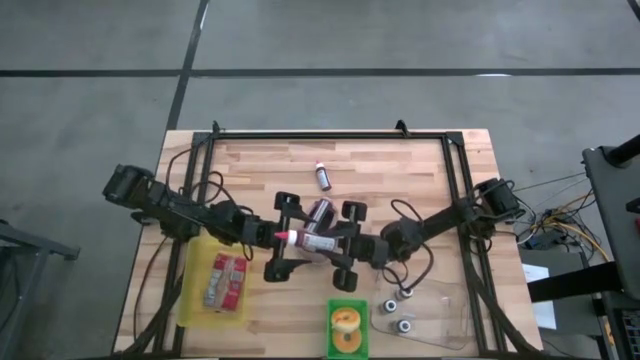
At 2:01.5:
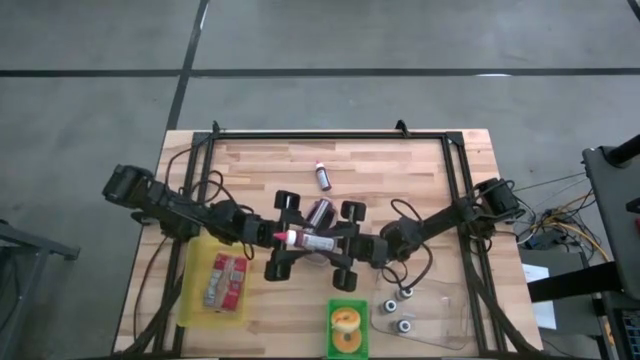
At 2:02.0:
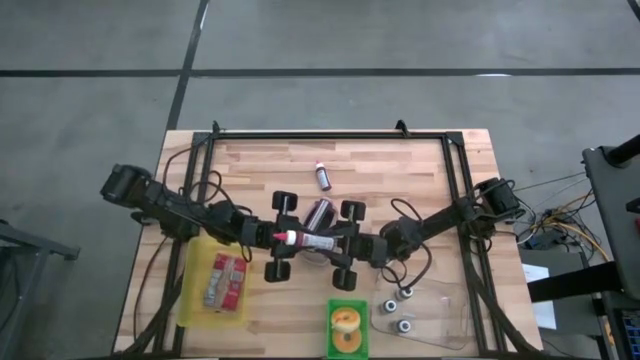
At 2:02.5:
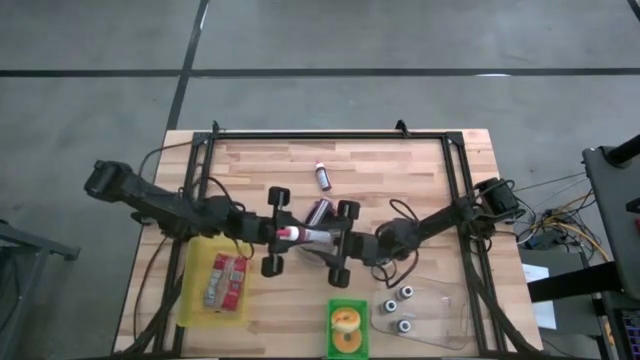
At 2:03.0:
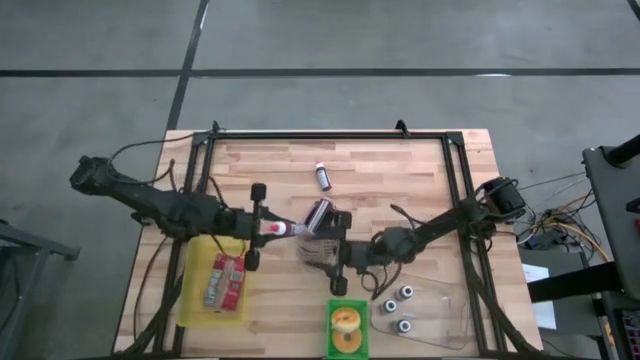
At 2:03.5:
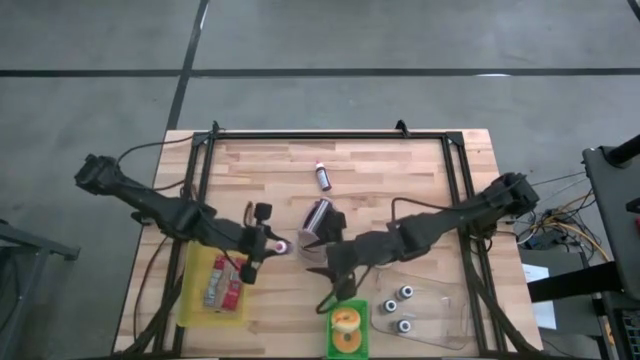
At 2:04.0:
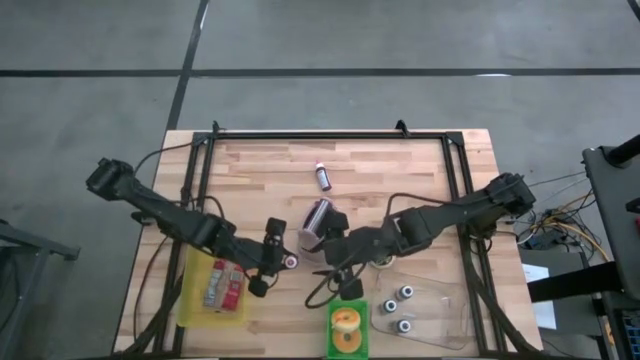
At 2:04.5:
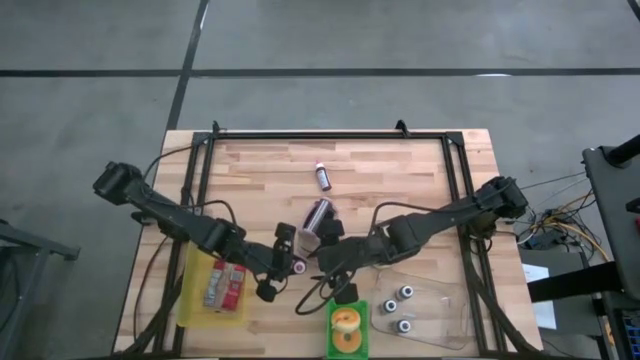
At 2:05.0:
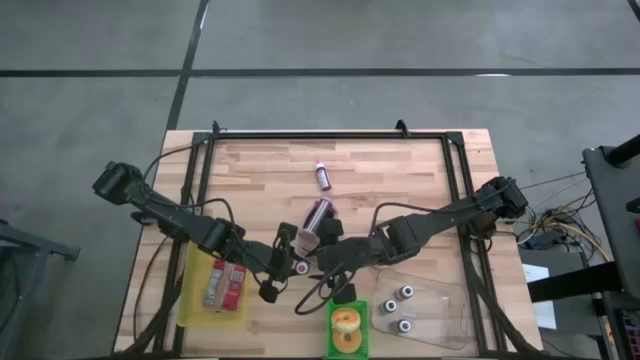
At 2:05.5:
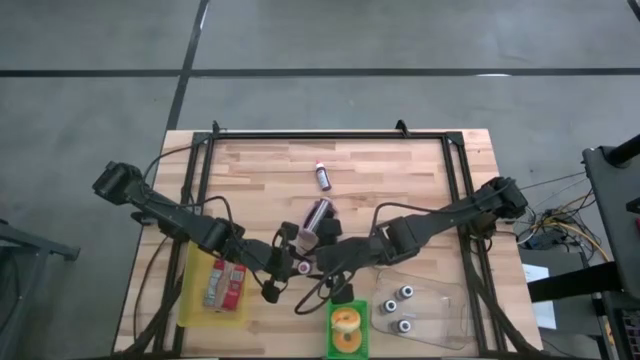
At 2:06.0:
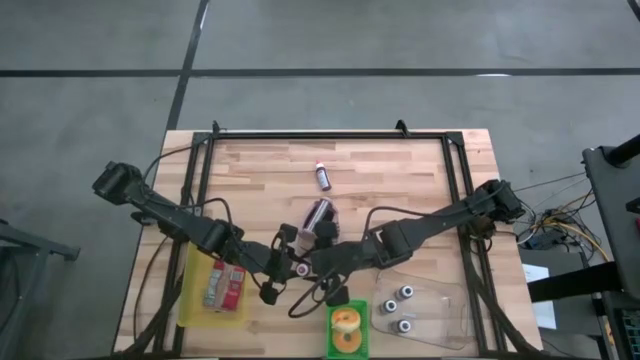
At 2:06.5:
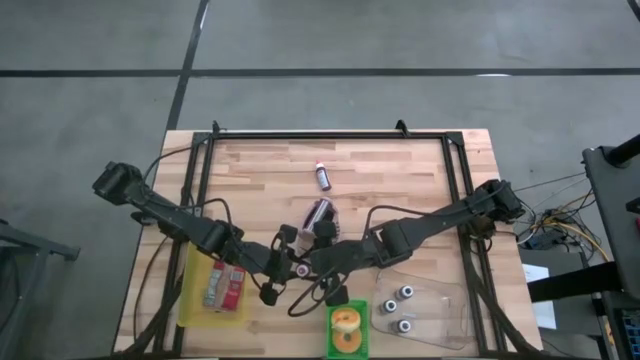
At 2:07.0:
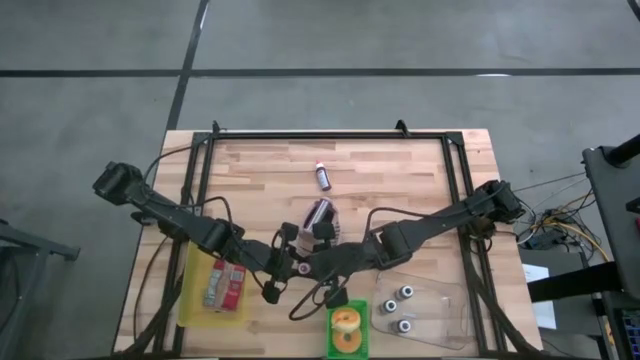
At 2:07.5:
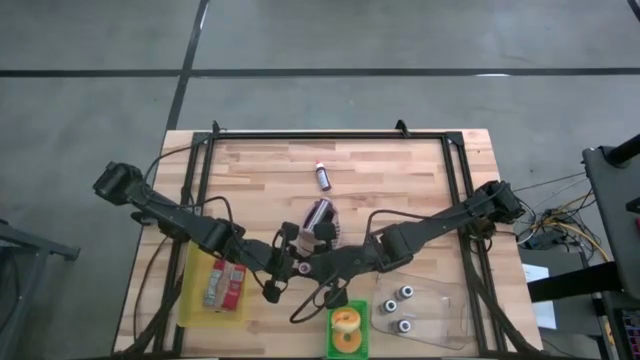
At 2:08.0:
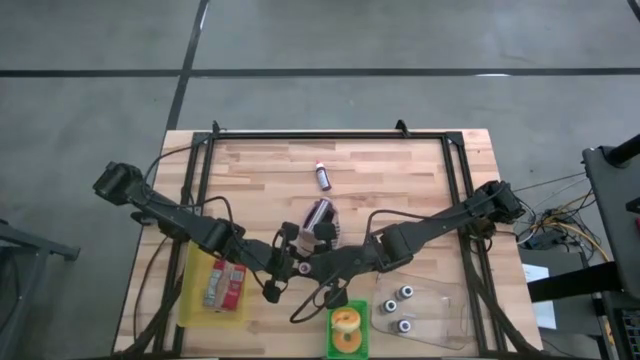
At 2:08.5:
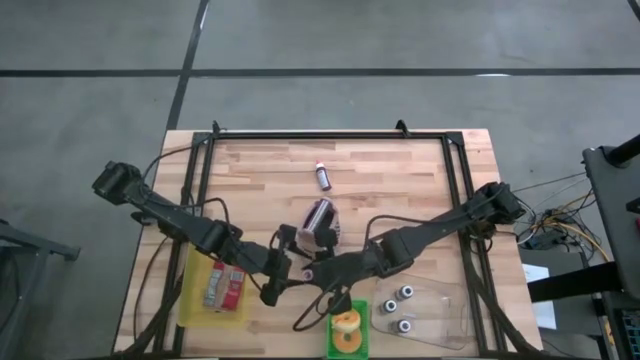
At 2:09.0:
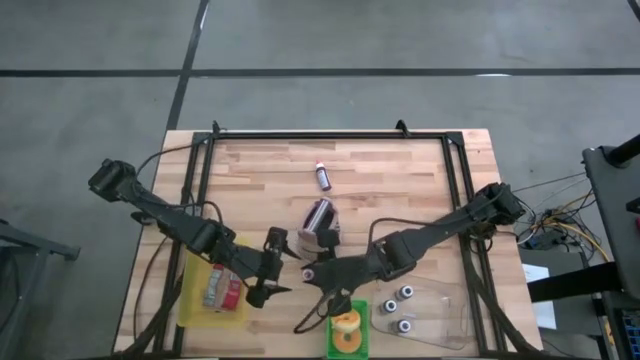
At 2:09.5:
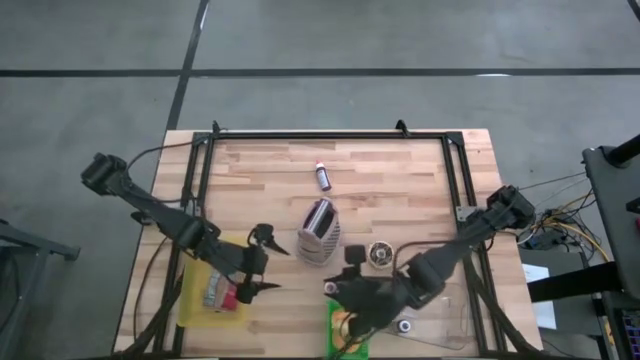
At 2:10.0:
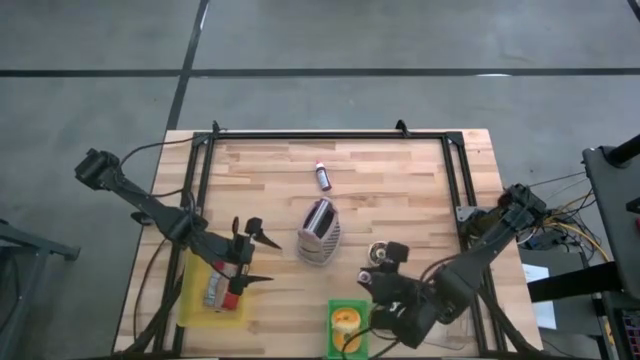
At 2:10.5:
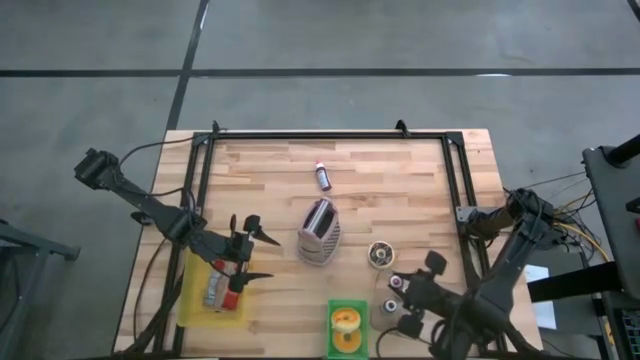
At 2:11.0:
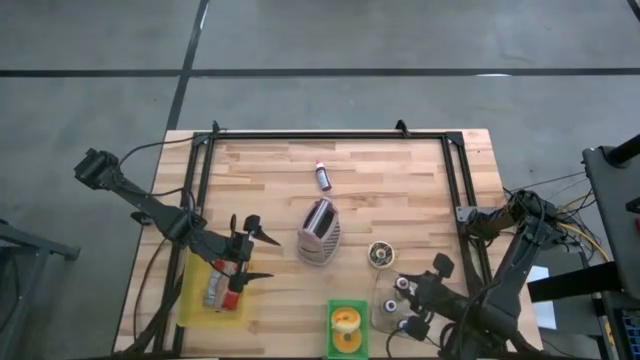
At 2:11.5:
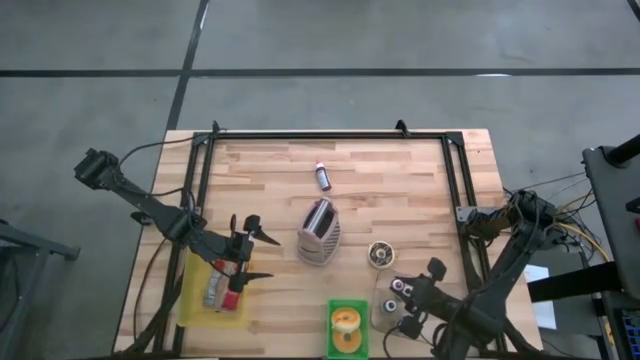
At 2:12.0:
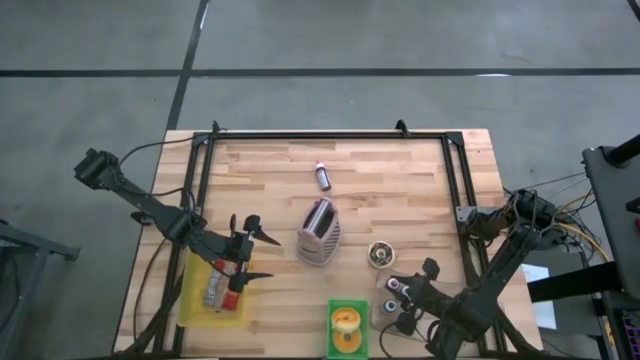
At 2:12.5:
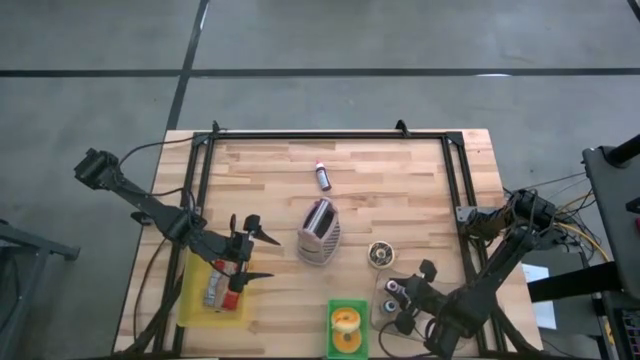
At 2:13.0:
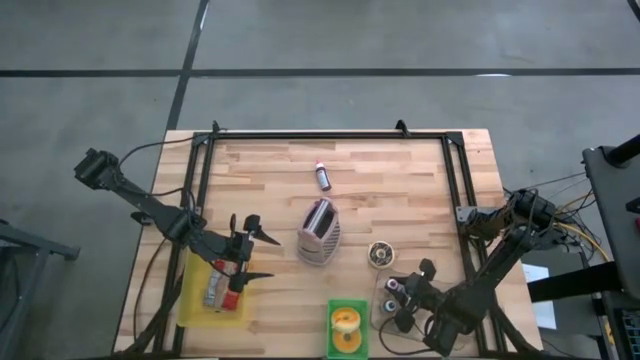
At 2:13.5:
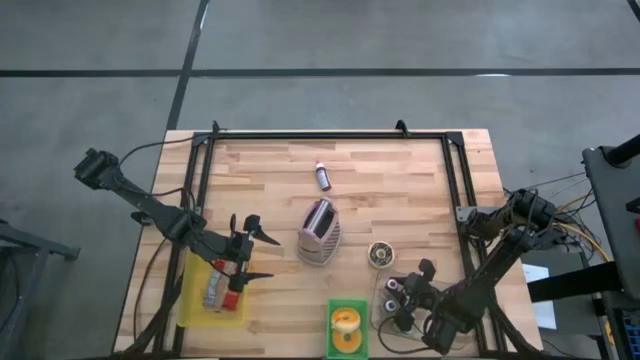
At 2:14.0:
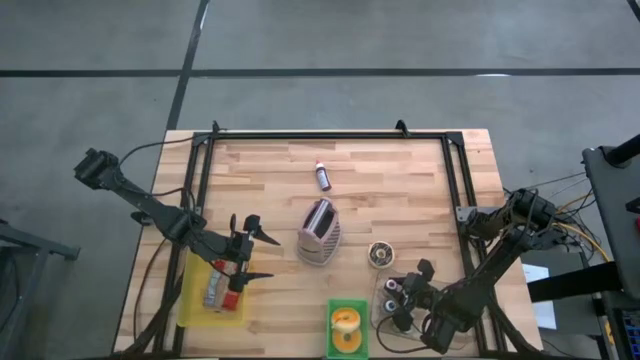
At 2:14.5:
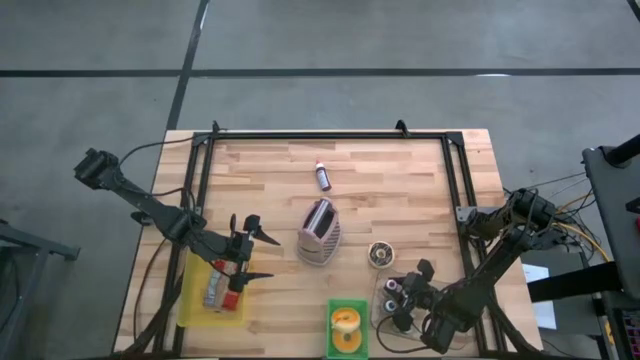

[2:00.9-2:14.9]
Task: Pick & Place Food Item
Put the red food coloring bottle into the transparent bin

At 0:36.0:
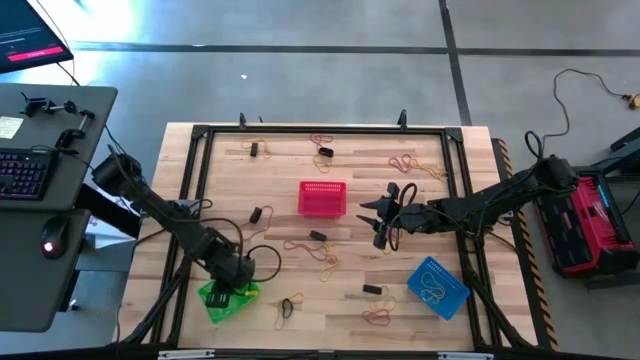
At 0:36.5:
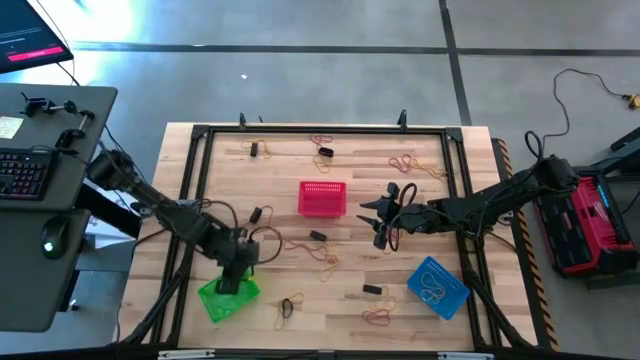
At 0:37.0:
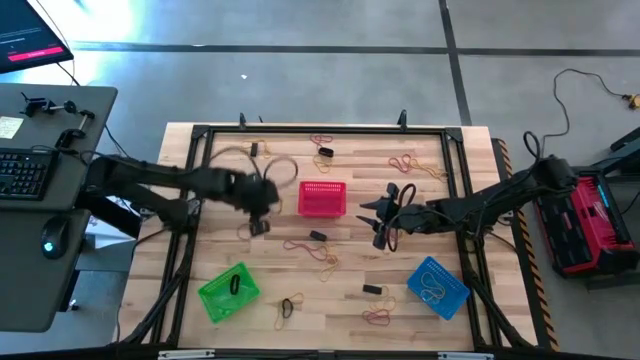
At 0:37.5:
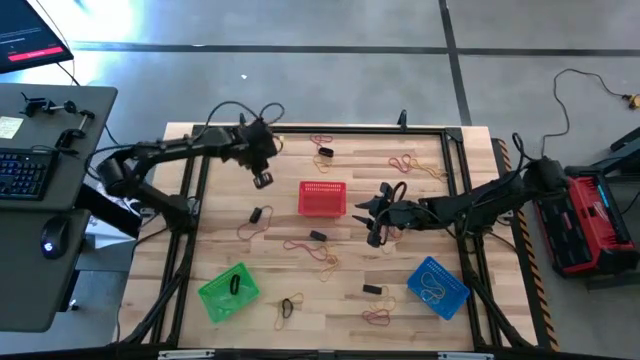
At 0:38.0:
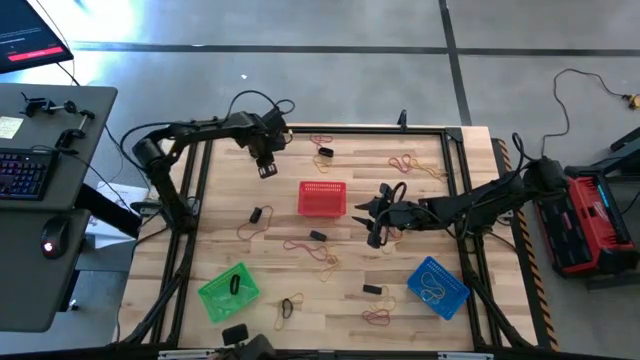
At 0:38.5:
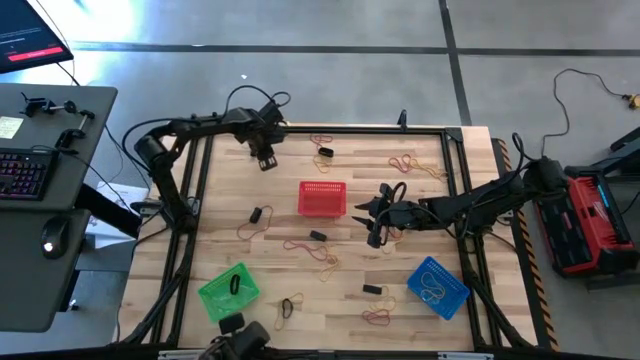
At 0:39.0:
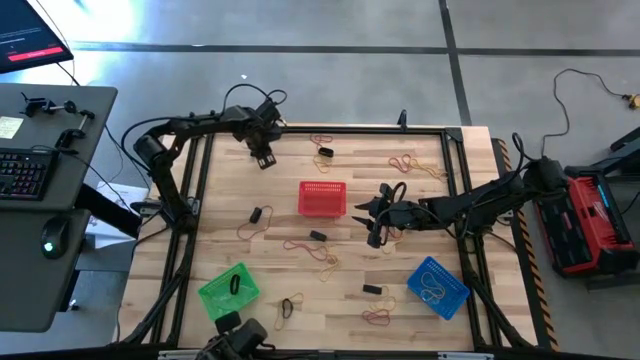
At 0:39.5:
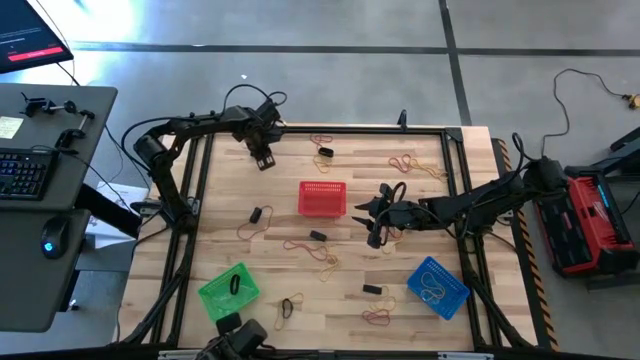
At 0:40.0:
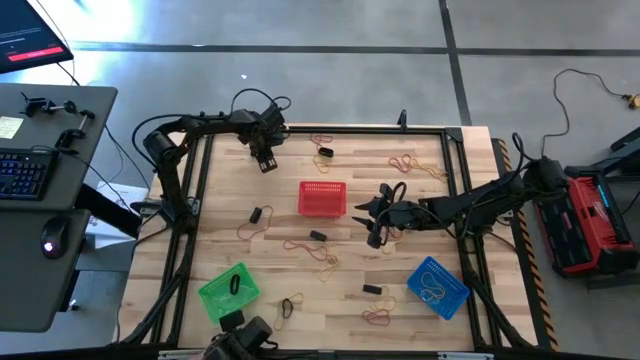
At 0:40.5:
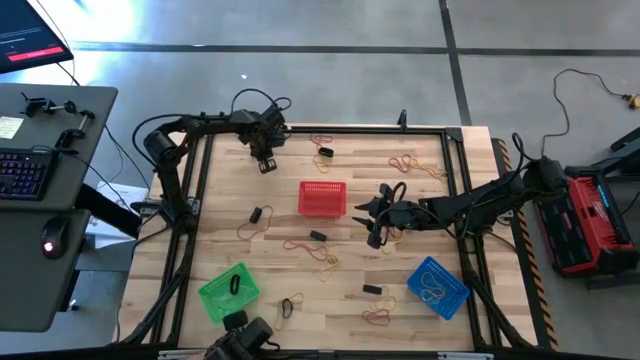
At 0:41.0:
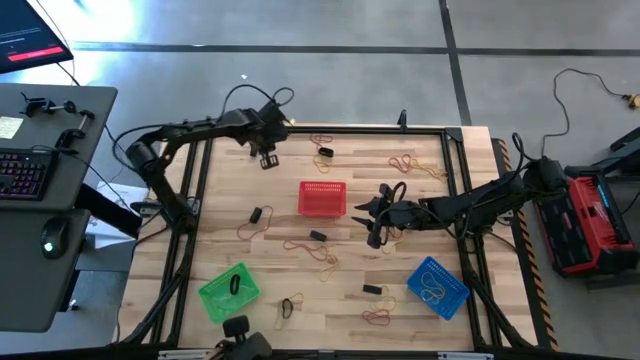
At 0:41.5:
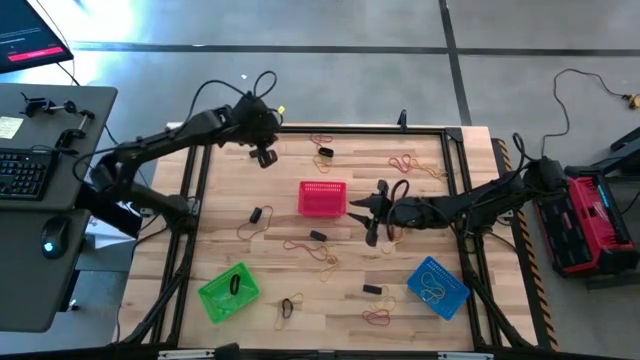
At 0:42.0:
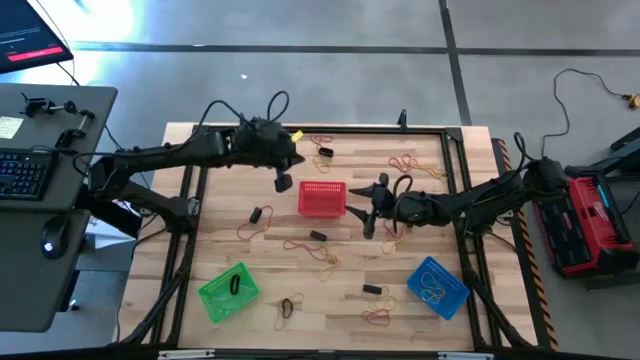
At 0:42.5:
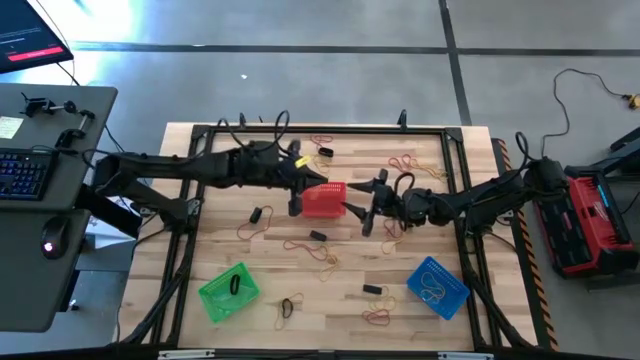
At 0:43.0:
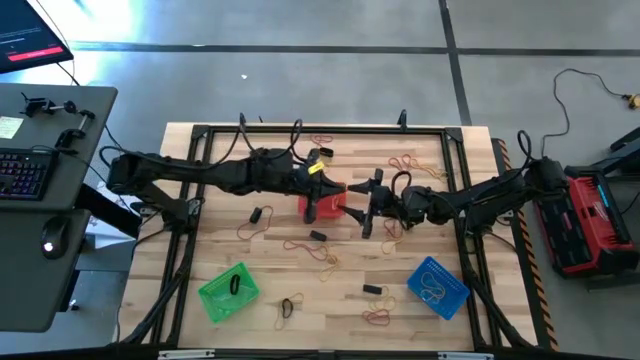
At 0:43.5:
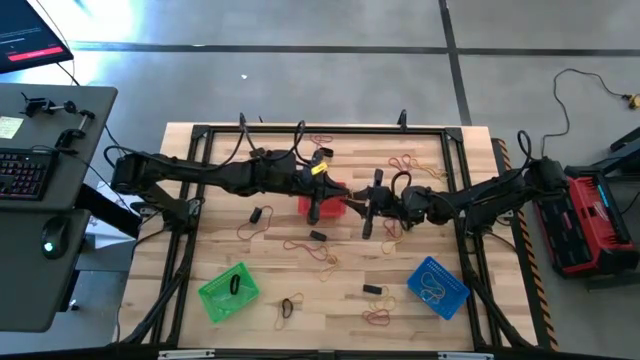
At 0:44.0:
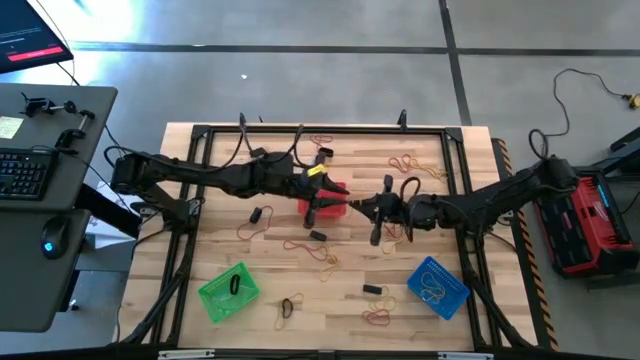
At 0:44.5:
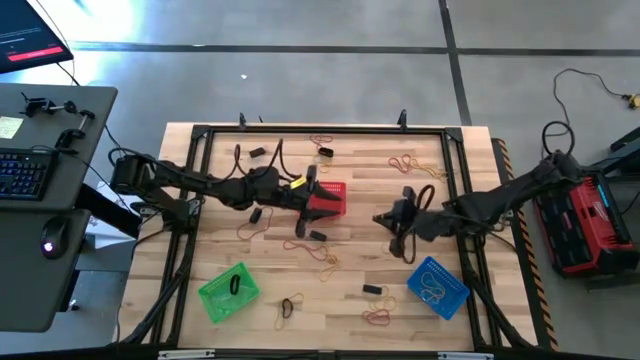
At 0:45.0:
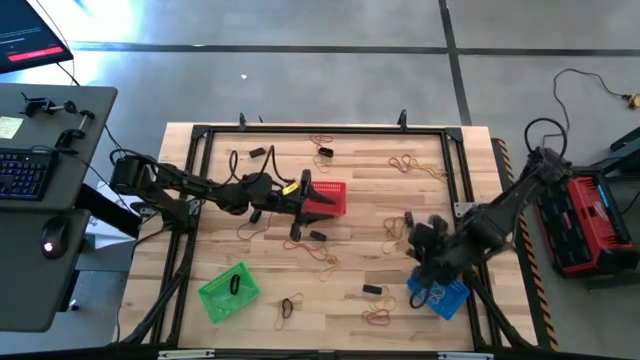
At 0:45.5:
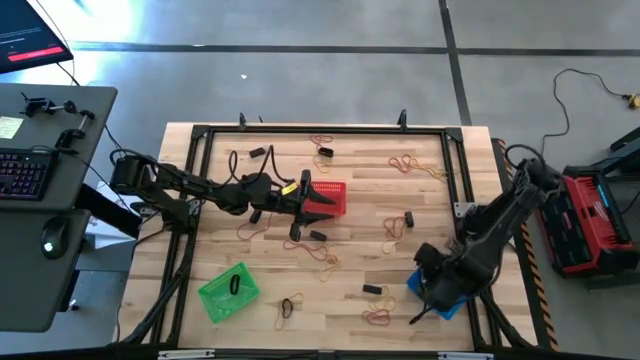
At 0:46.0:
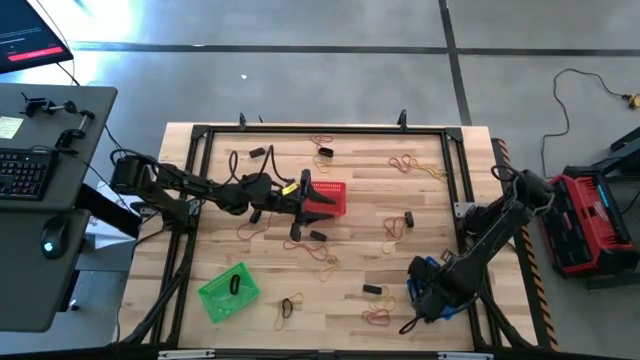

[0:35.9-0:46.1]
Task: Sort rubber bands into baskets
Put the yellow rubber band into the blue bin
